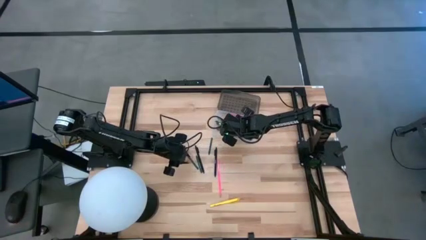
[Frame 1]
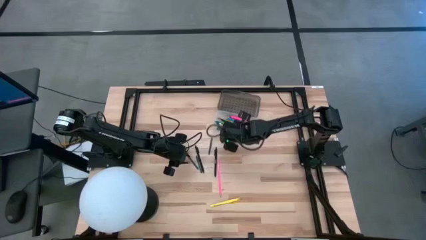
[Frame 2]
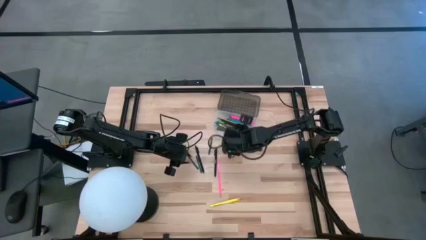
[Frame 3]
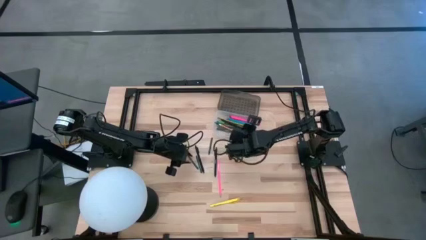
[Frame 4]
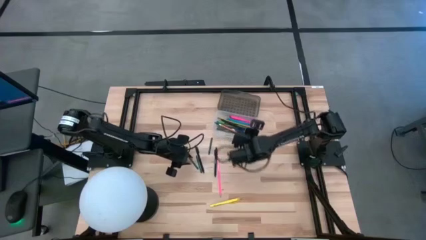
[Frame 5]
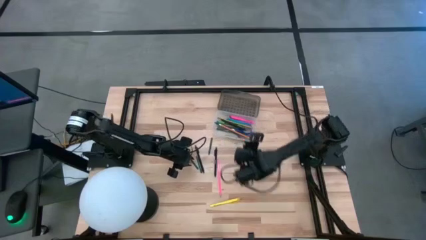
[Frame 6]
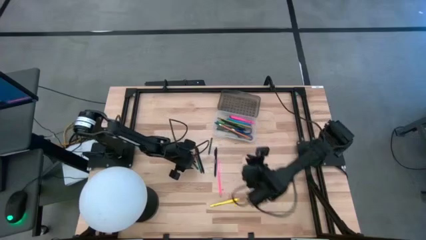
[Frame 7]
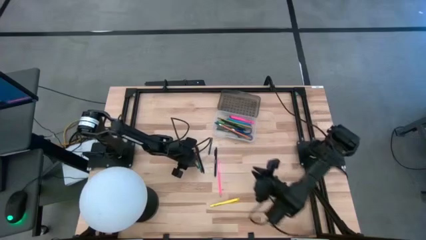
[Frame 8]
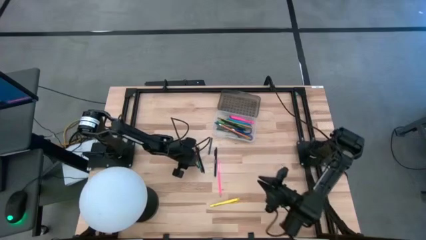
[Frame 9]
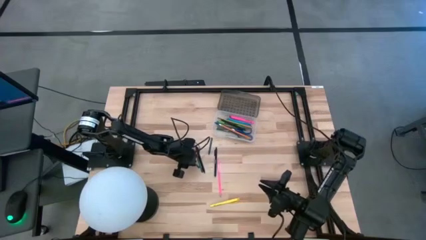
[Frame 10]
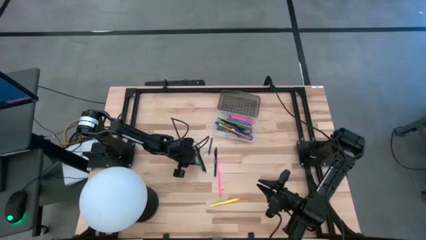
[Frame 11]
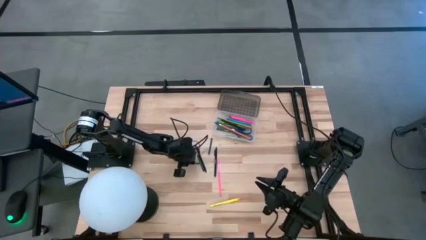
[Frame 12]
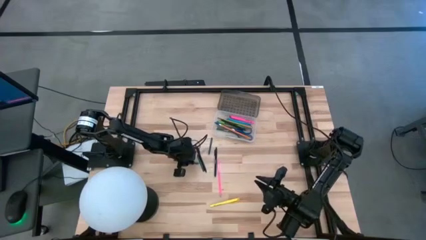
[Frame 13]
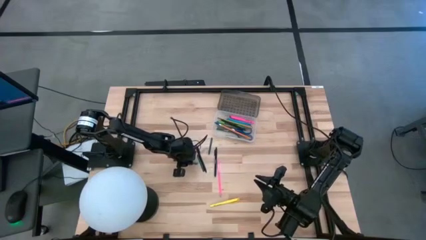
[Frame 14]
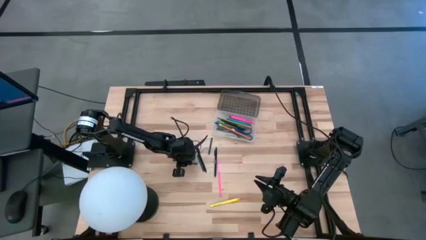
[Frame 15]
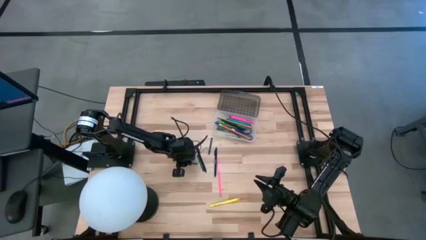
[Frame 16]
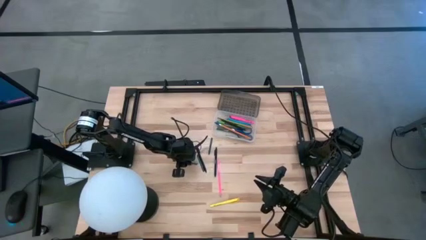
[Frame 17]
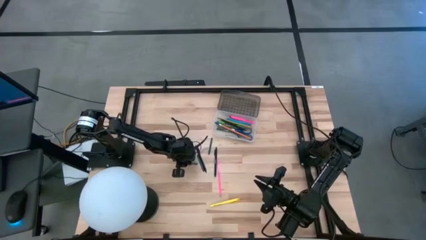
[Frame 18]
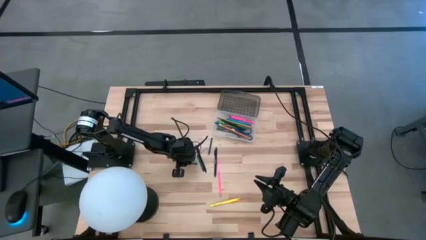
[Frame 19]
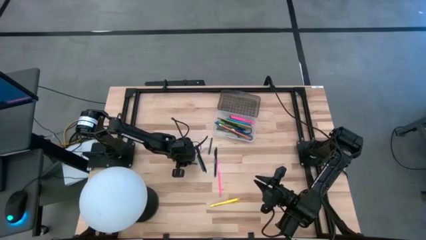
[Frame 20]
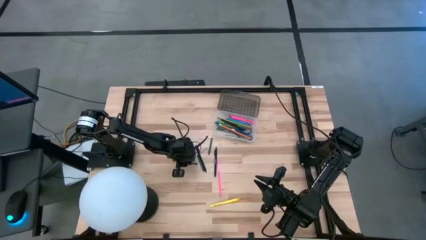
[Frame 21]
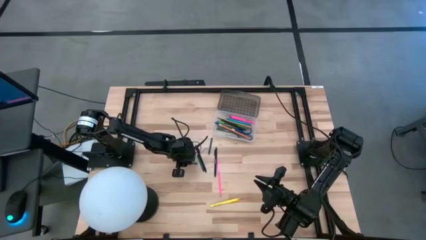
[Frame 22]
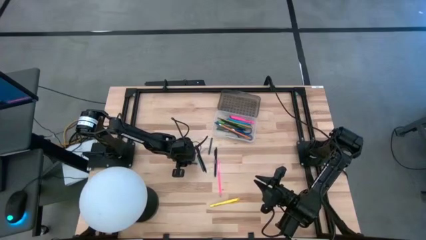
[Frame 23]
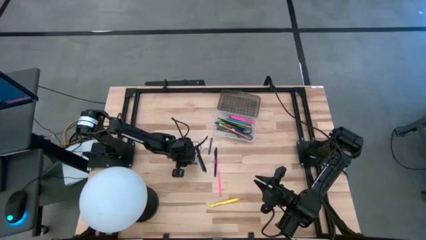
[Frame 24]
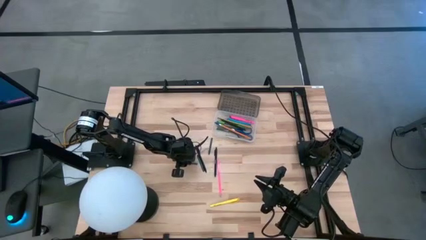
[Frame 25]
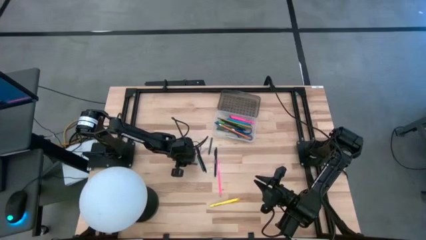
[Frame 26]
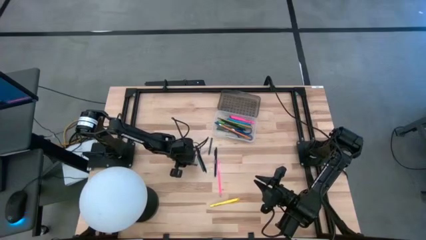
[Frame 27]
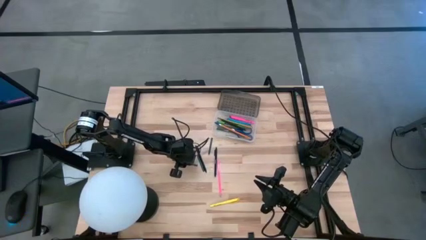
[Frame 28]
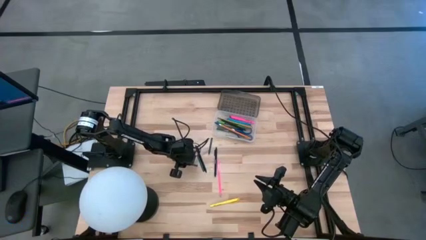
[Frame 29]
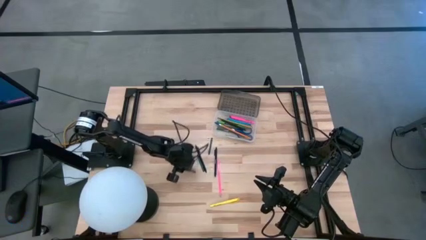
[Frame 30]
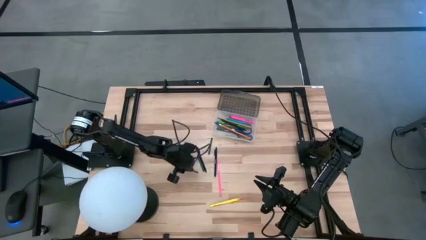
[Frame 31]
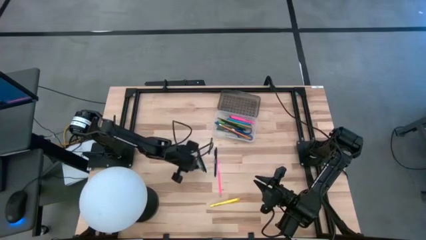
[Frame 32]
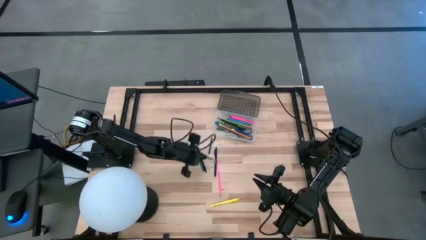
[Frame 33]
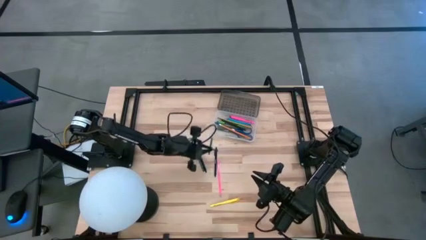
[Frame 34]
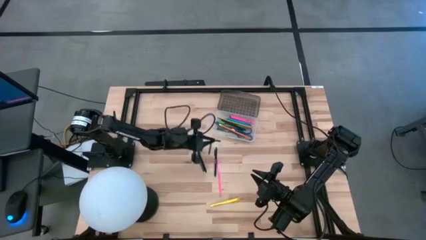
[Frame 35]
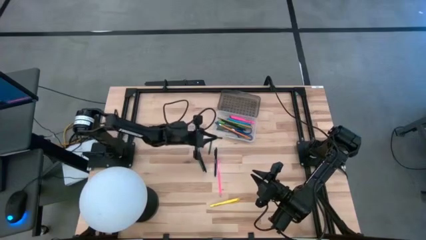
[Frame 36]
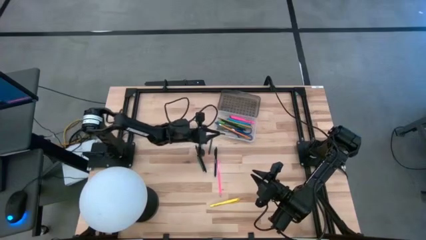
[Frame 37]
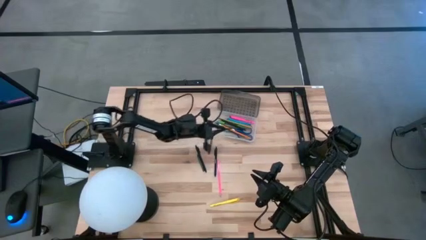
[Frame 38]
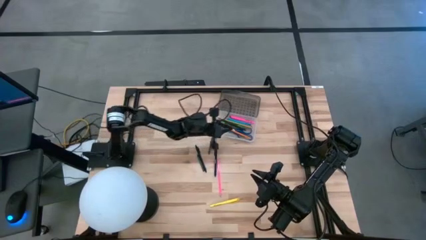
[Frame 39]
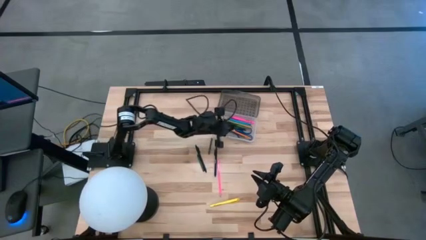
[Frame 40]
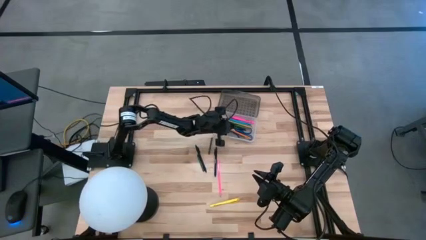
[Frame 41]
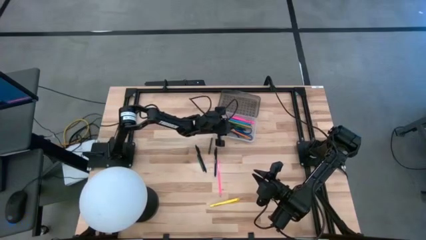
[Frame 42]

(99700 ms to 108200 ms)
Task: Pick & place school supplies into a supply box
Put the green crayon into the black supply box

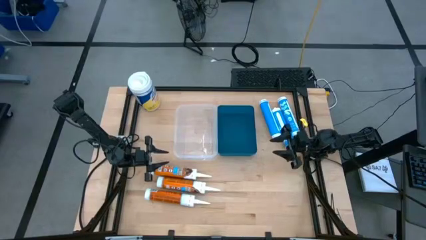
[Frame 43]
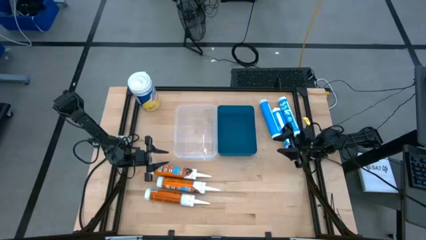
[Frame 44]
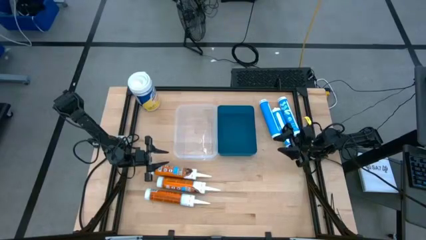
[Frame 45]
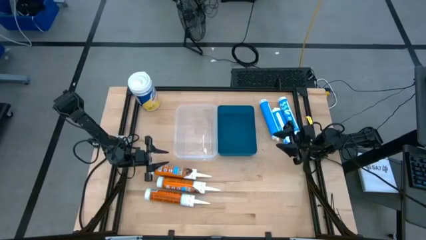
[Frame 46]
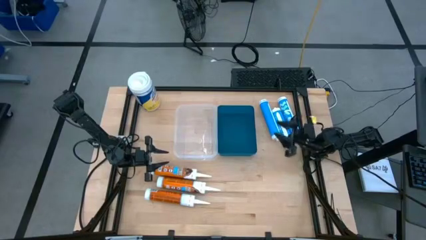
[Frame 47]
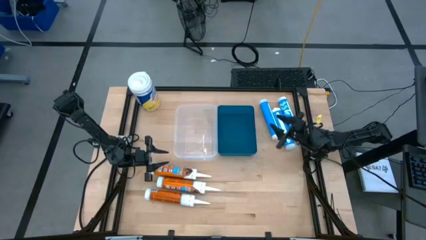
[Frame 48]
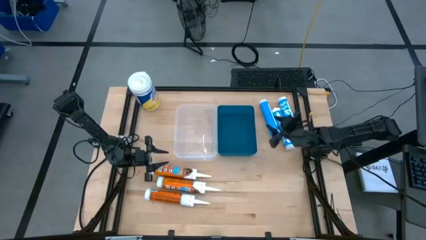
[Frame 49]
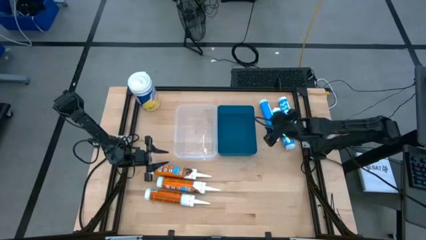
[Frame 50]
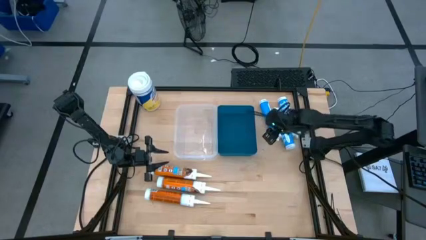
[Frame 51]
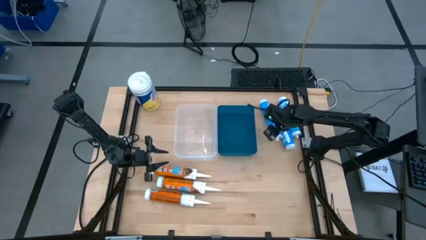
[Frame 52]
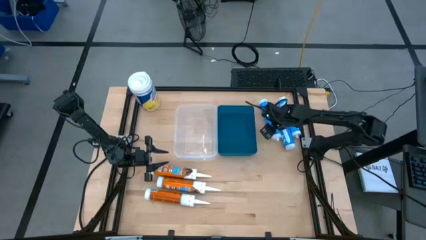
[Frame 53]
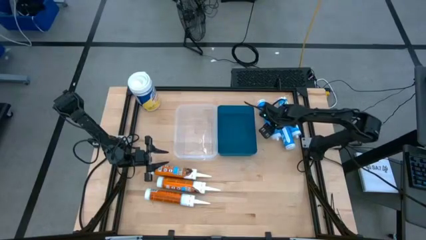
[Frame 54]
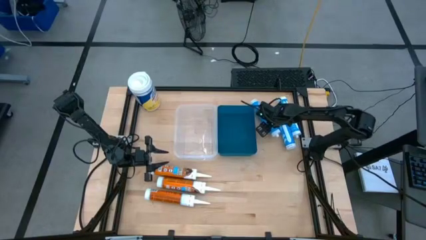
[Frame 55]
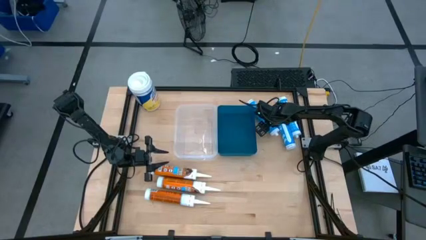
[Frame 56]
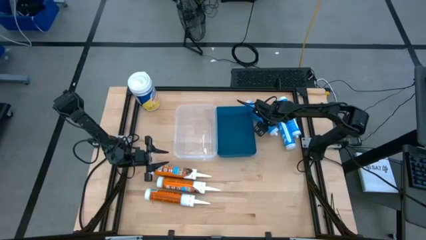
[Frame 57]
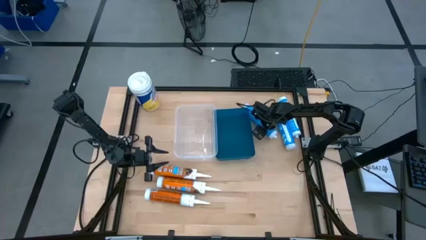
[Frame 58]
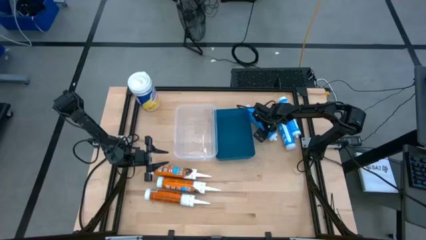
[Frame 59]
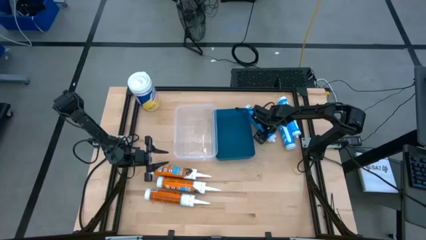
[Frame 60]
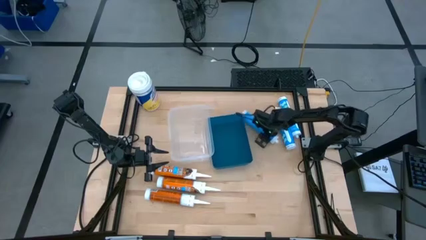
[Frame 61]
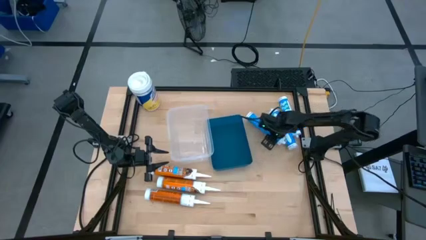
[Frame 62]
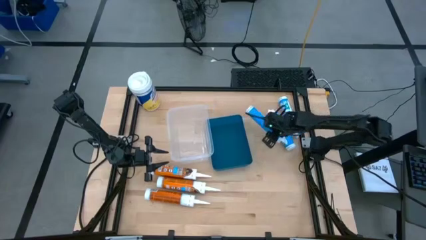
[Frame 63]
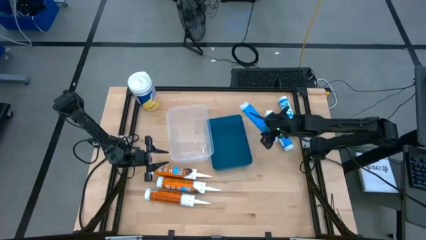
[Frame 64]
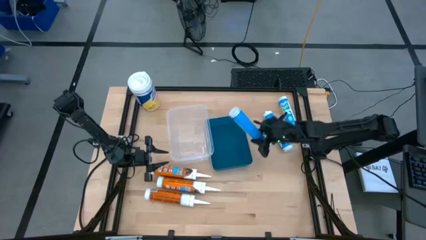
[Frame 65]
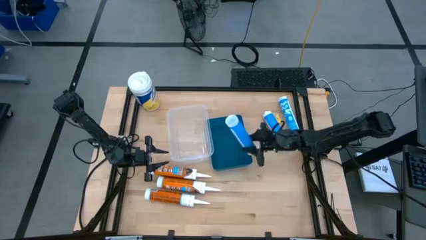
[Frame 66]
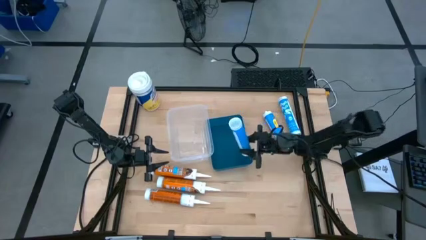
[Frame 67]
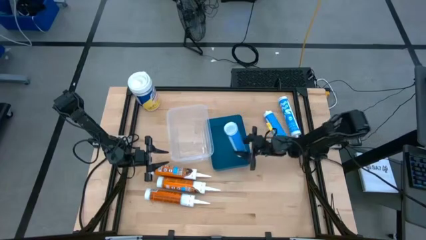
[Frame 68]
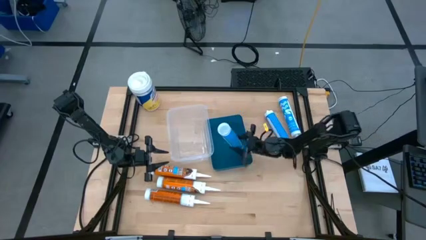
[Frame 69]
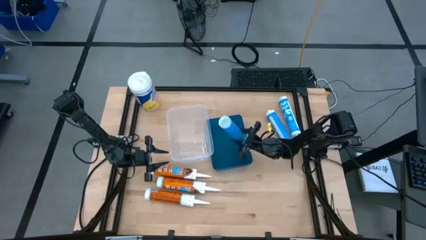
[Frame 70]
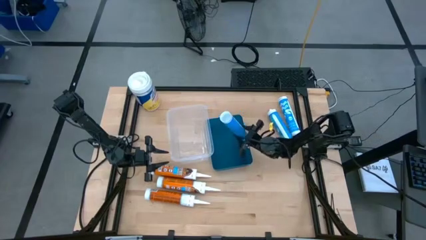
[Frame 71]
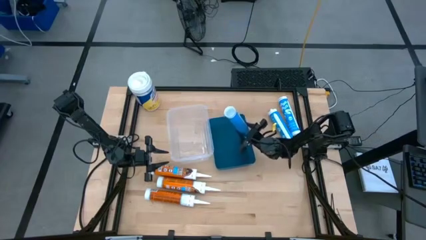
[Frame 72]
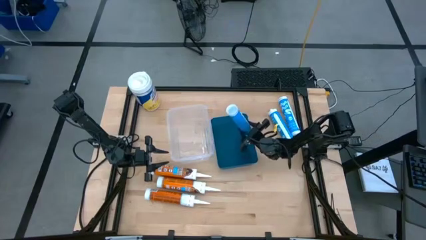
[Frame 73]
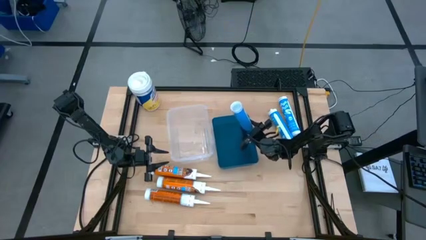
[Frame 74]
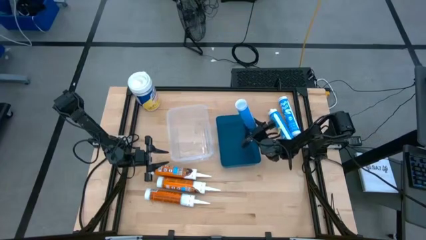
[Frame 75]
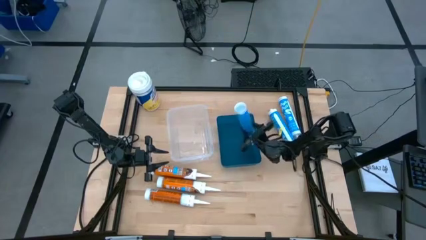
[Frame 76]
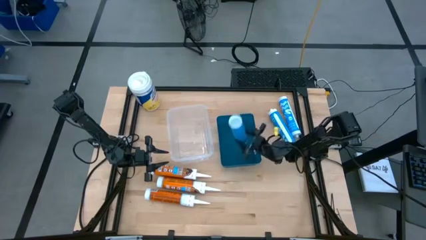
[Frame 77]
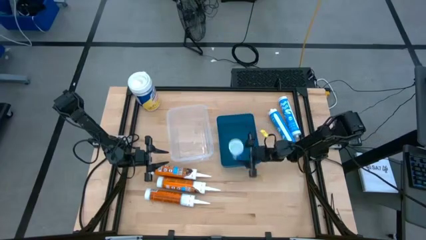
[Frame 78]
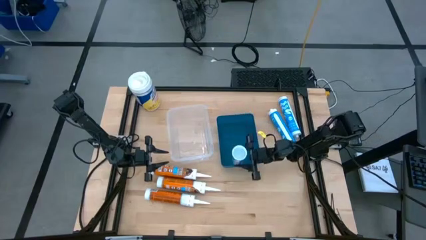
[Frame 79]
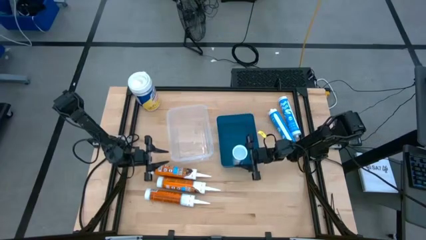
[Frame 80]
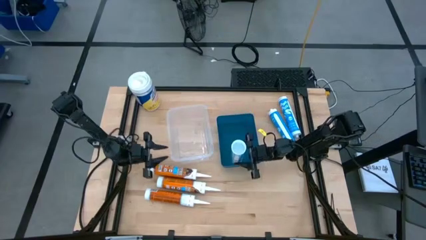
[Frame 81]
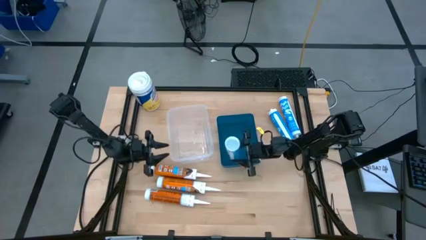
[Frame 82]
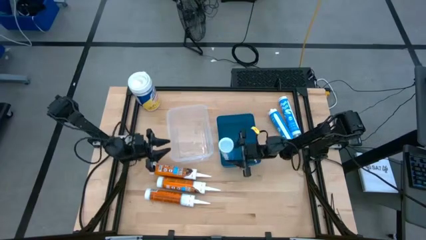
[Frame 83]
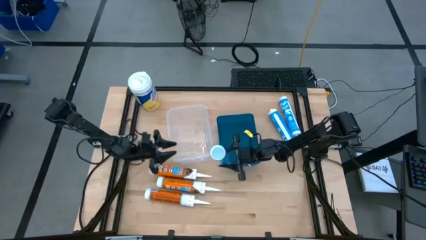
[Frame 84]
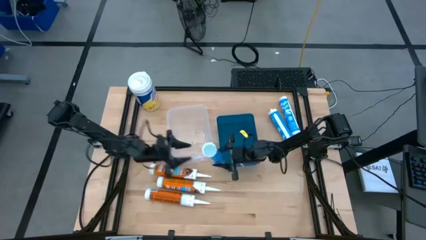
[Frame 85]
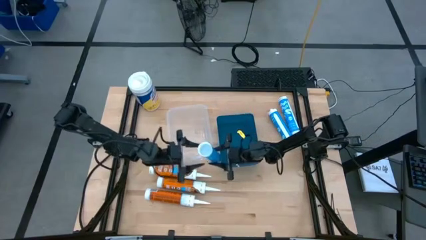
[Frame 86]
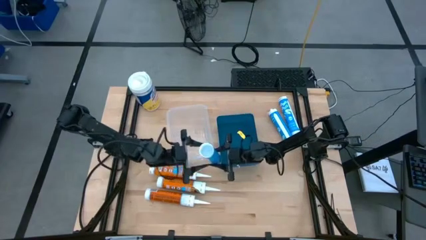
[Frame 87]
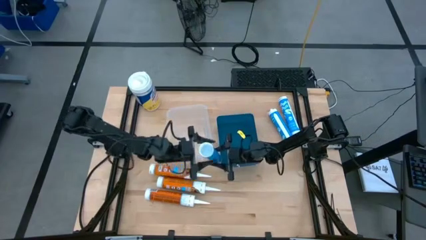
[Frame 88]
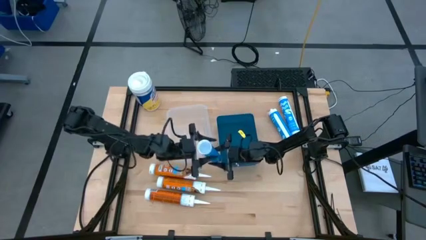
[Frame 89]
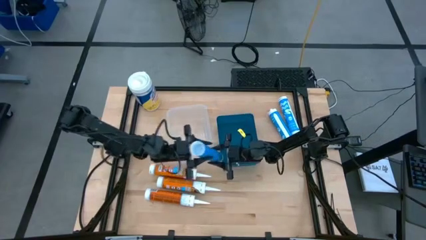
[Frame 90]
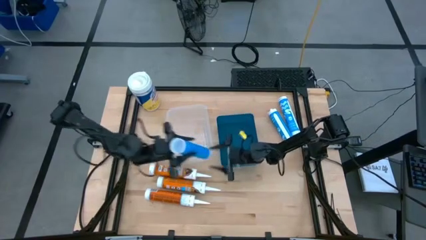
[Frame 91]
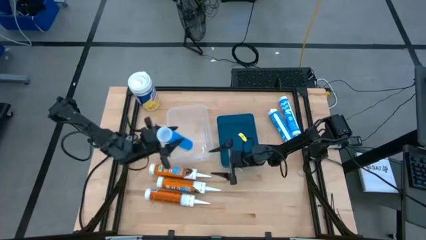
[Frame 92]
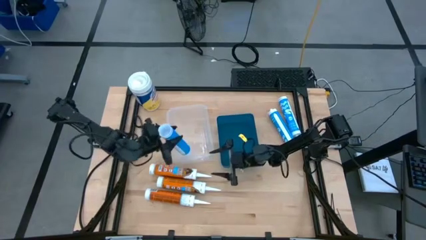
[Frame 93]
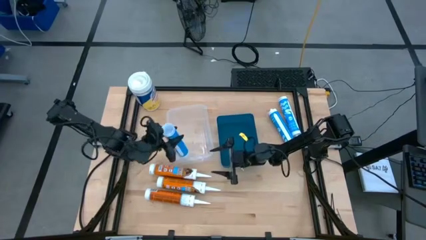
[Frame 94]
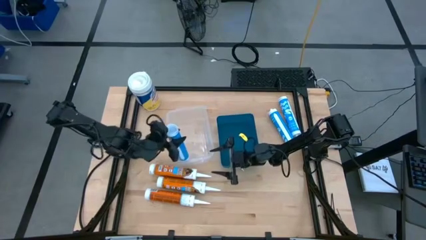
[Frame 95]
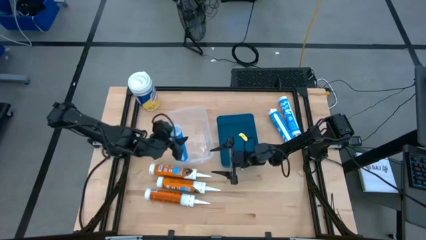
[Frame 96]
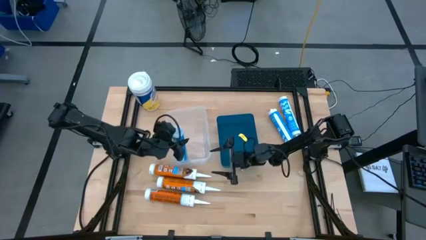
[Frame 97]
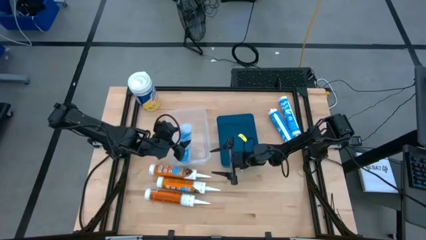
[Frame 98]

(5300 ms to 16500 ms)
Task: Pick & place silicon tubes, Sealant and Lysol wipes
Put the left blue sealant into the transparent bin
